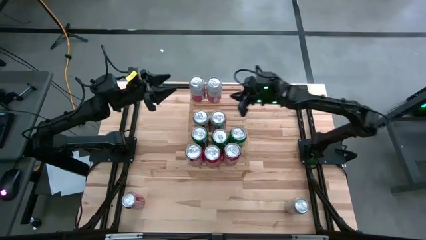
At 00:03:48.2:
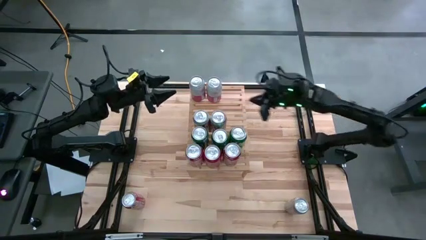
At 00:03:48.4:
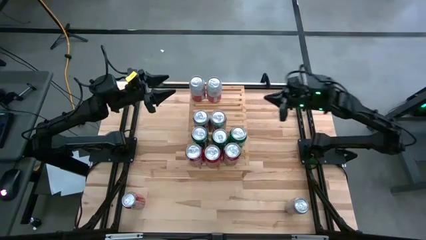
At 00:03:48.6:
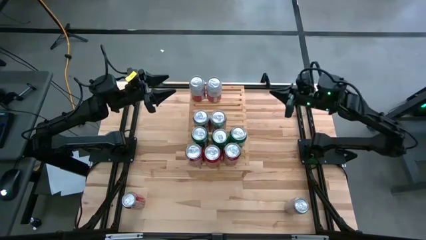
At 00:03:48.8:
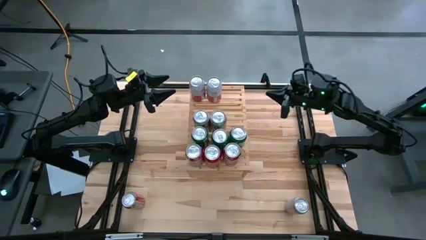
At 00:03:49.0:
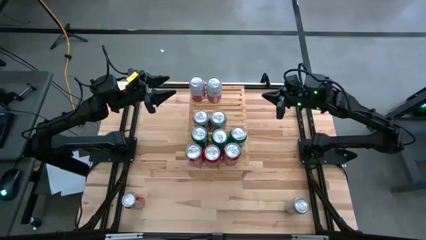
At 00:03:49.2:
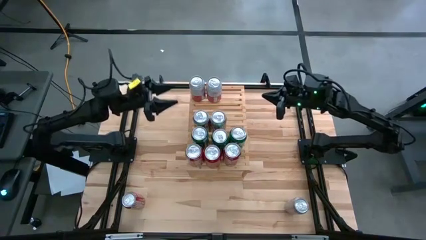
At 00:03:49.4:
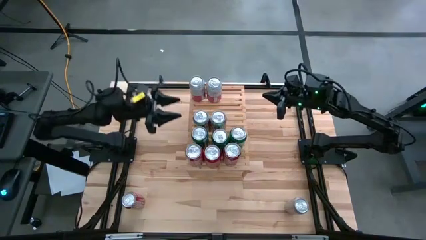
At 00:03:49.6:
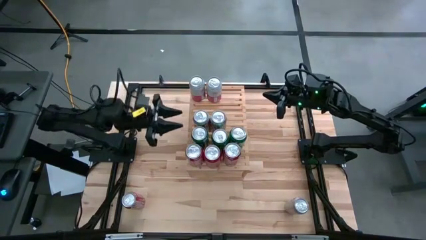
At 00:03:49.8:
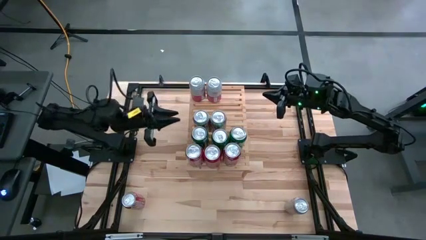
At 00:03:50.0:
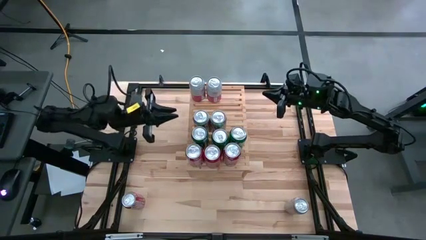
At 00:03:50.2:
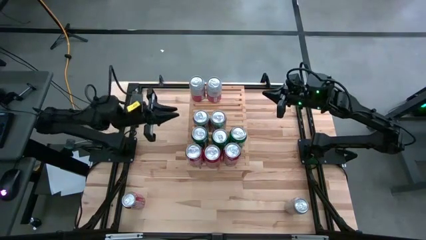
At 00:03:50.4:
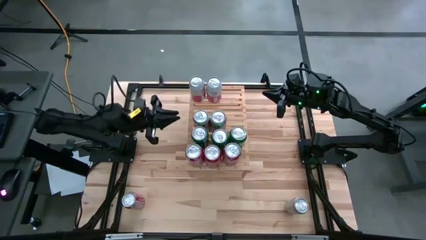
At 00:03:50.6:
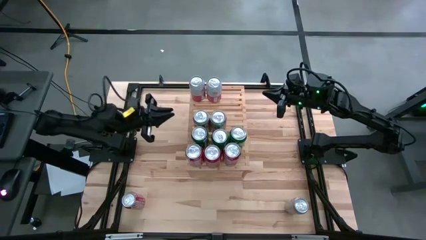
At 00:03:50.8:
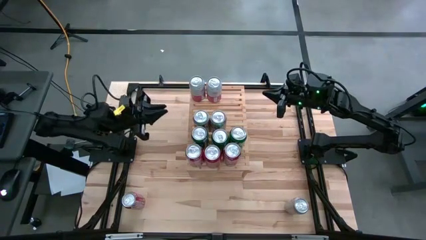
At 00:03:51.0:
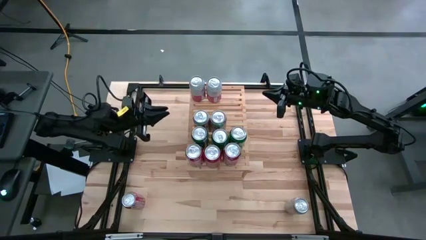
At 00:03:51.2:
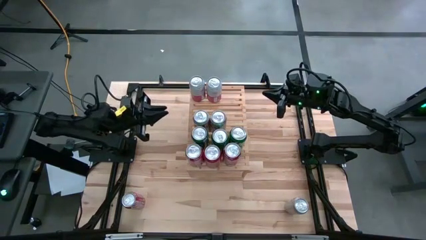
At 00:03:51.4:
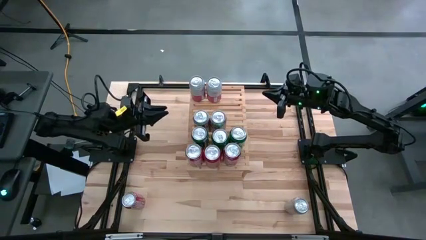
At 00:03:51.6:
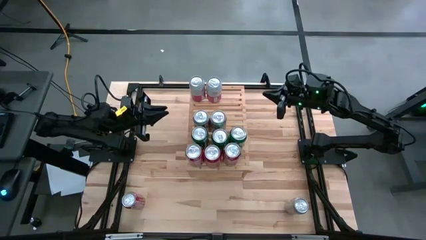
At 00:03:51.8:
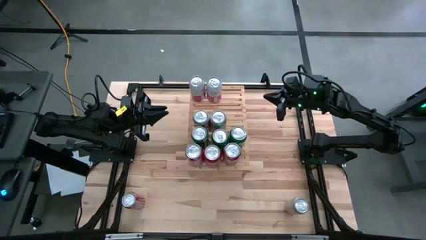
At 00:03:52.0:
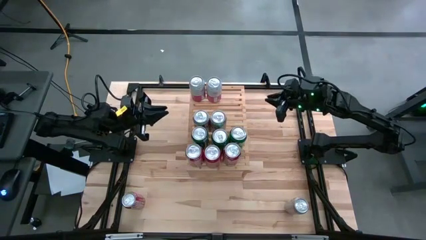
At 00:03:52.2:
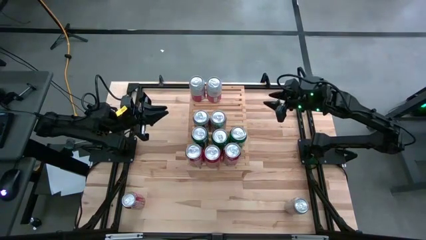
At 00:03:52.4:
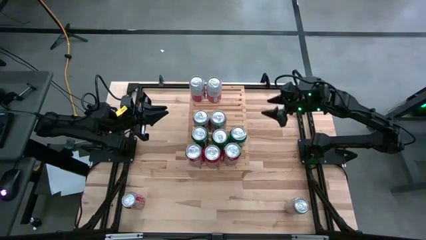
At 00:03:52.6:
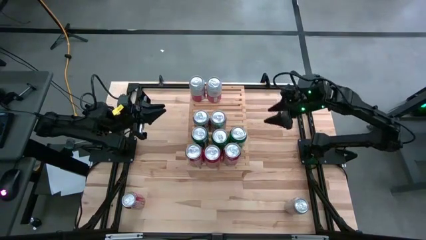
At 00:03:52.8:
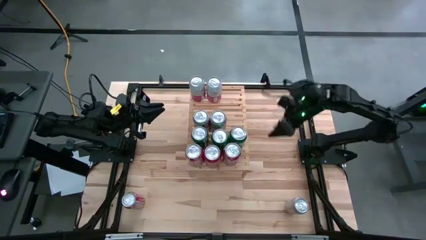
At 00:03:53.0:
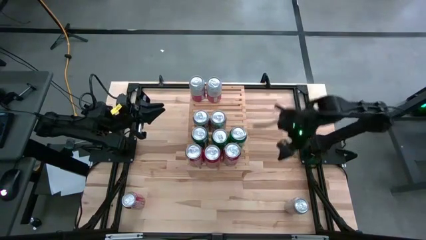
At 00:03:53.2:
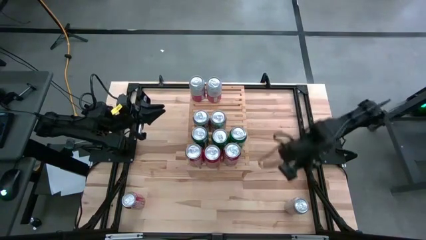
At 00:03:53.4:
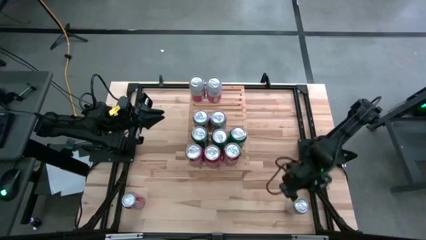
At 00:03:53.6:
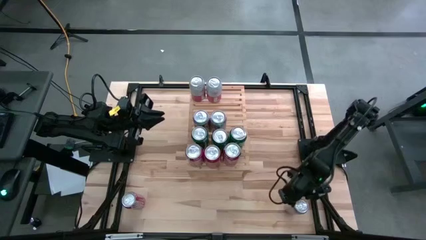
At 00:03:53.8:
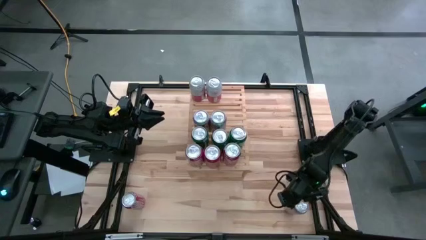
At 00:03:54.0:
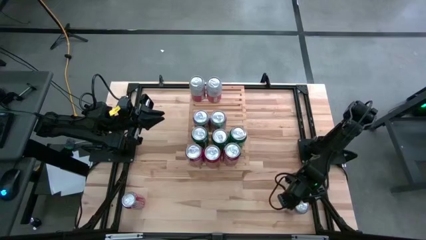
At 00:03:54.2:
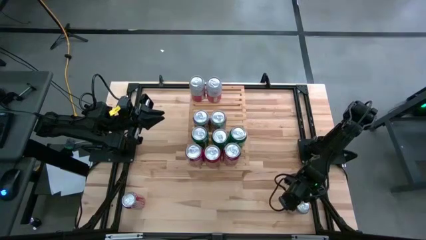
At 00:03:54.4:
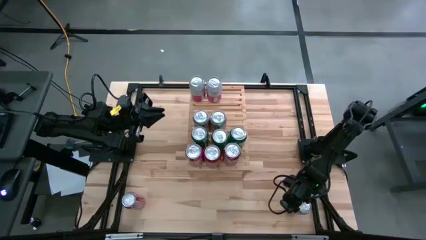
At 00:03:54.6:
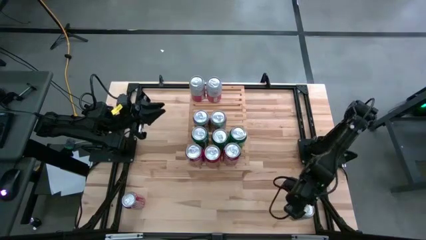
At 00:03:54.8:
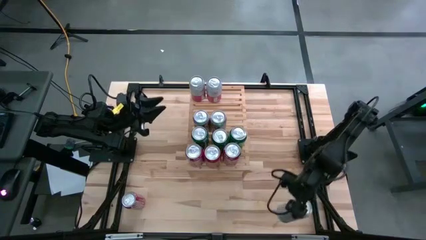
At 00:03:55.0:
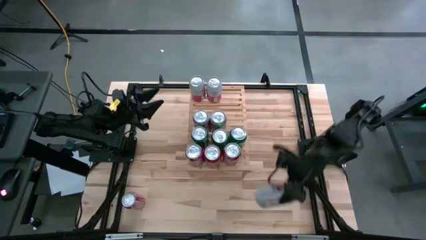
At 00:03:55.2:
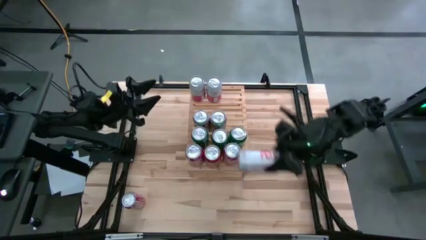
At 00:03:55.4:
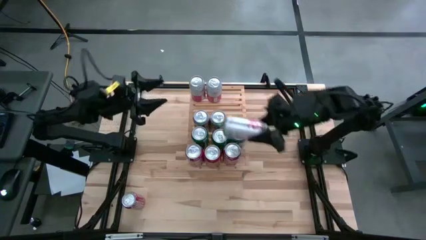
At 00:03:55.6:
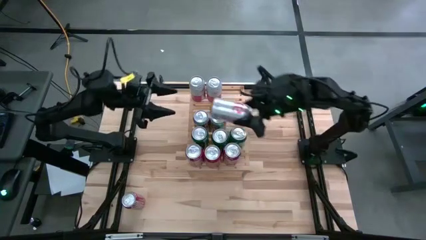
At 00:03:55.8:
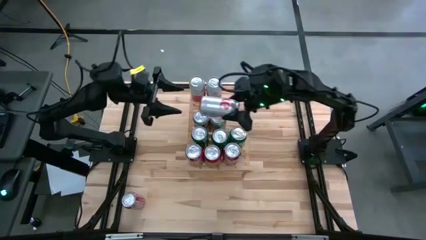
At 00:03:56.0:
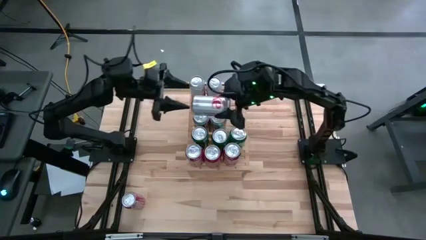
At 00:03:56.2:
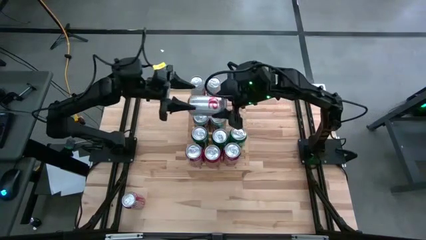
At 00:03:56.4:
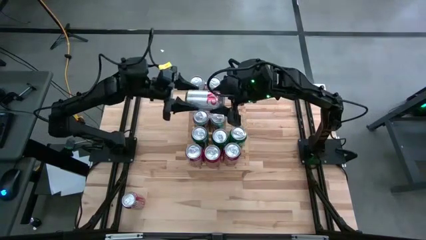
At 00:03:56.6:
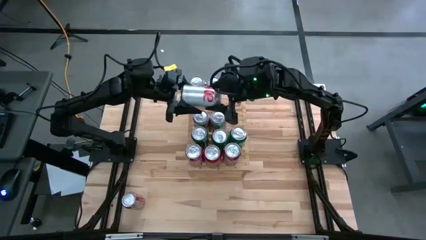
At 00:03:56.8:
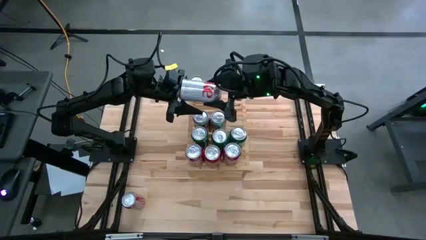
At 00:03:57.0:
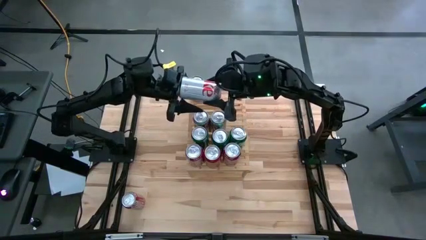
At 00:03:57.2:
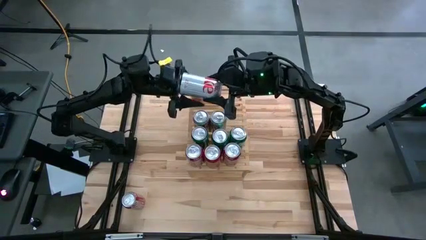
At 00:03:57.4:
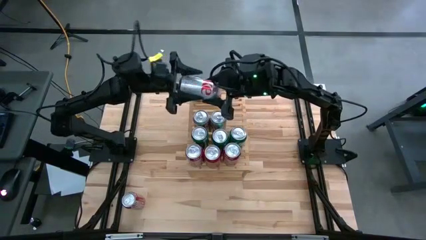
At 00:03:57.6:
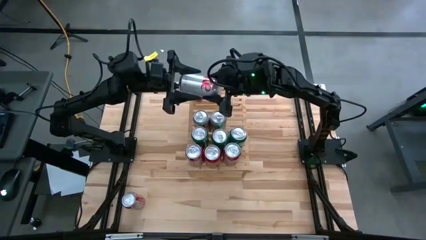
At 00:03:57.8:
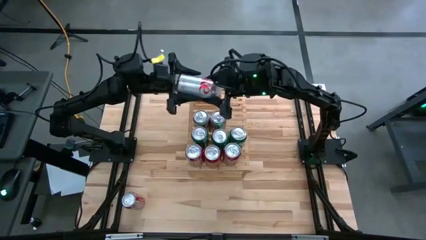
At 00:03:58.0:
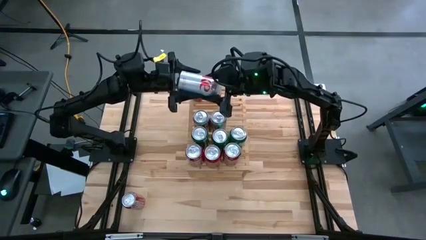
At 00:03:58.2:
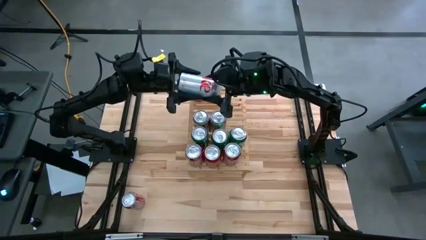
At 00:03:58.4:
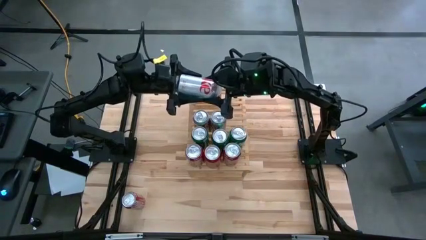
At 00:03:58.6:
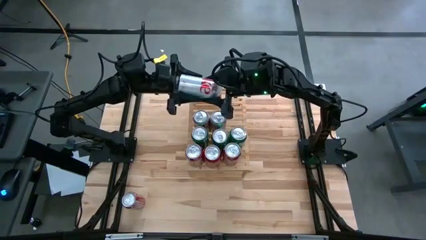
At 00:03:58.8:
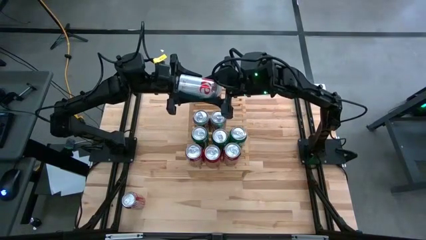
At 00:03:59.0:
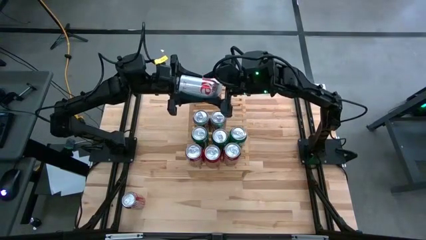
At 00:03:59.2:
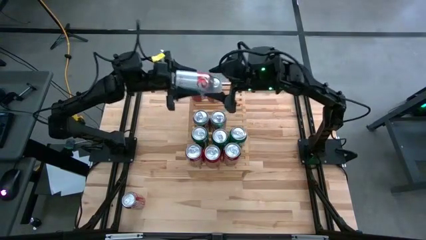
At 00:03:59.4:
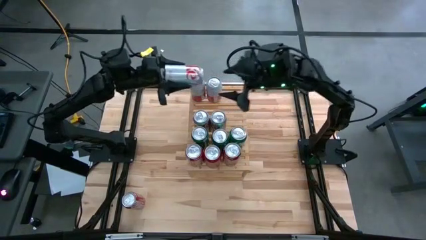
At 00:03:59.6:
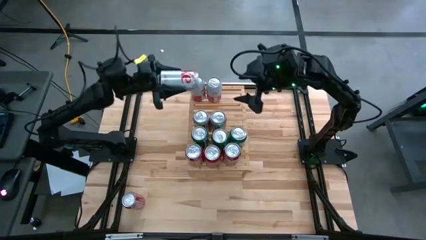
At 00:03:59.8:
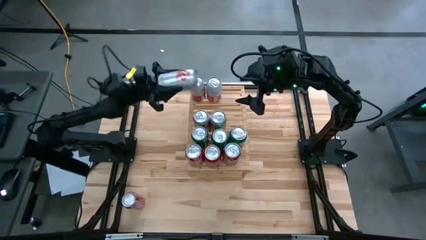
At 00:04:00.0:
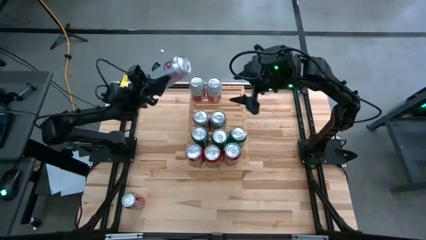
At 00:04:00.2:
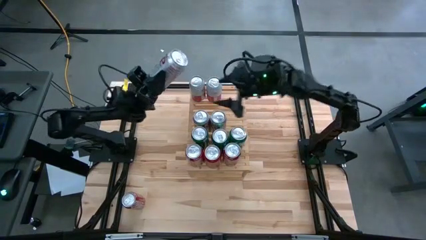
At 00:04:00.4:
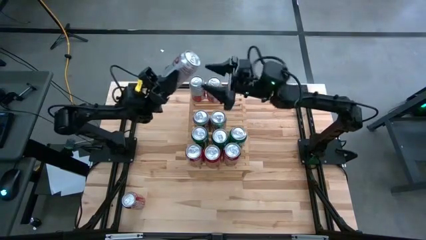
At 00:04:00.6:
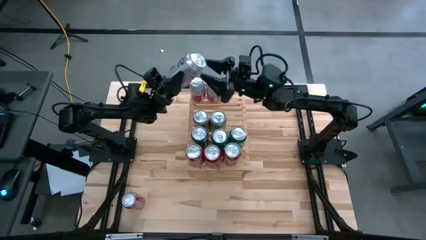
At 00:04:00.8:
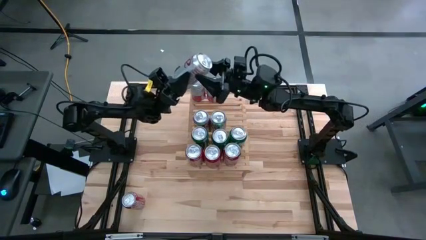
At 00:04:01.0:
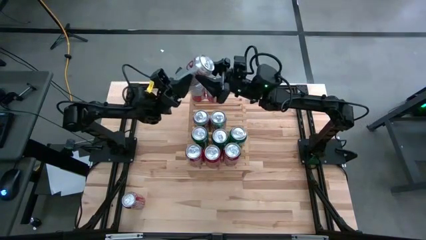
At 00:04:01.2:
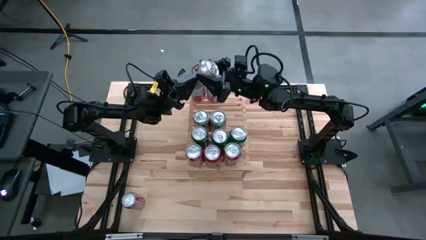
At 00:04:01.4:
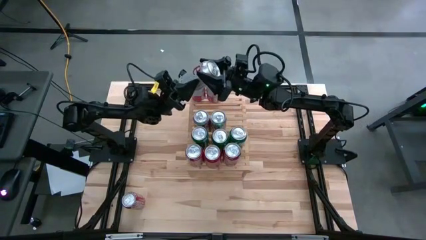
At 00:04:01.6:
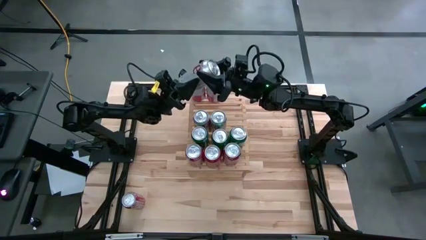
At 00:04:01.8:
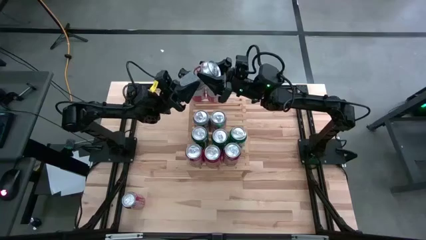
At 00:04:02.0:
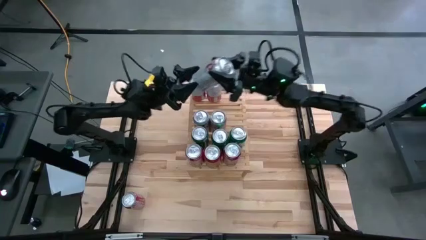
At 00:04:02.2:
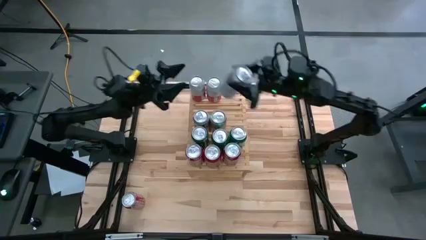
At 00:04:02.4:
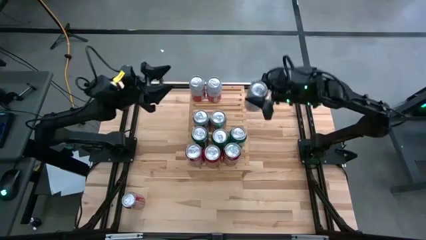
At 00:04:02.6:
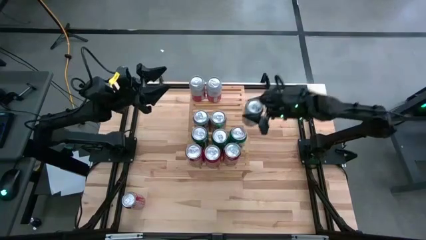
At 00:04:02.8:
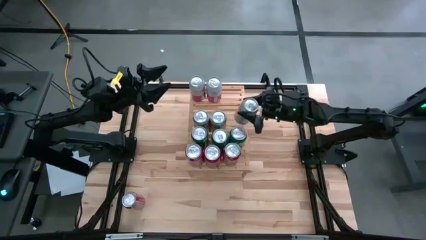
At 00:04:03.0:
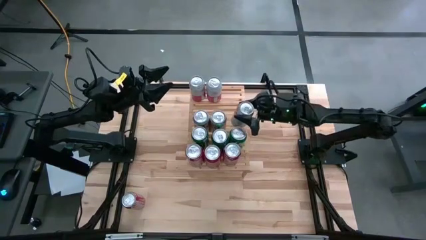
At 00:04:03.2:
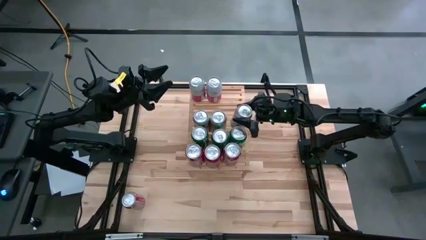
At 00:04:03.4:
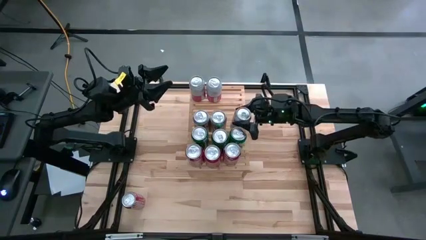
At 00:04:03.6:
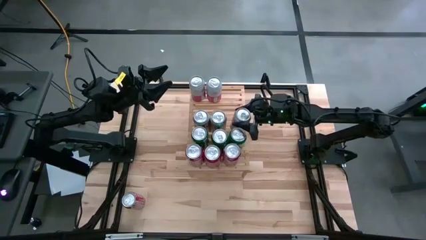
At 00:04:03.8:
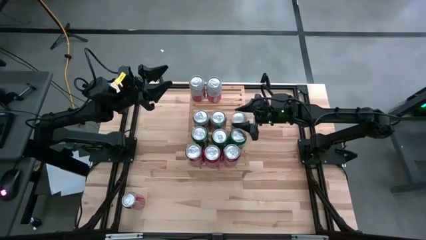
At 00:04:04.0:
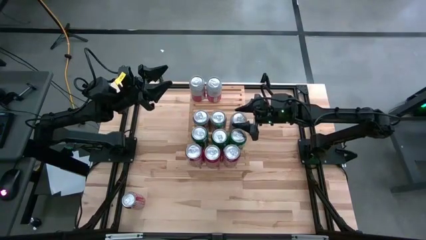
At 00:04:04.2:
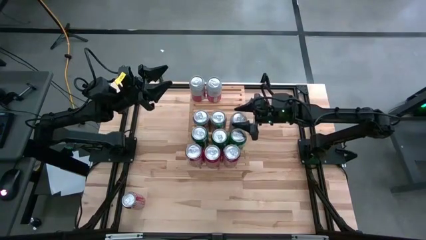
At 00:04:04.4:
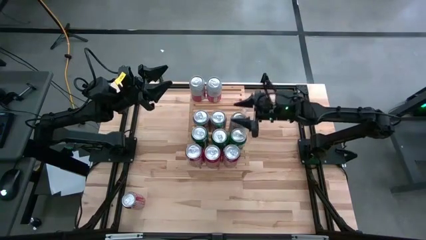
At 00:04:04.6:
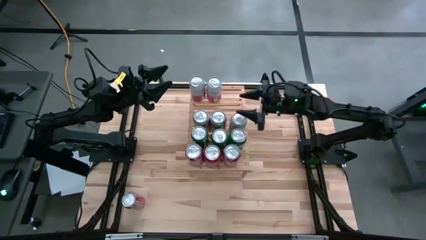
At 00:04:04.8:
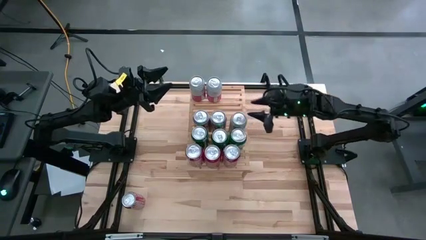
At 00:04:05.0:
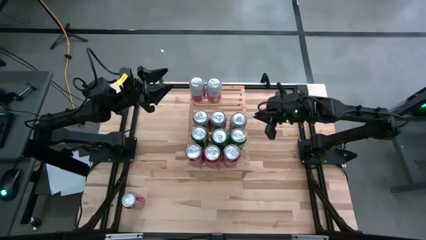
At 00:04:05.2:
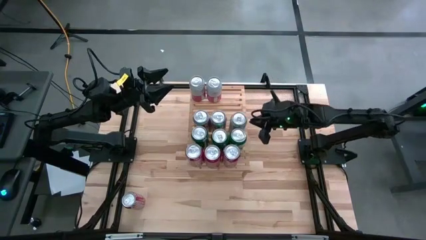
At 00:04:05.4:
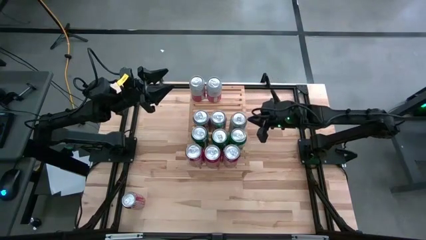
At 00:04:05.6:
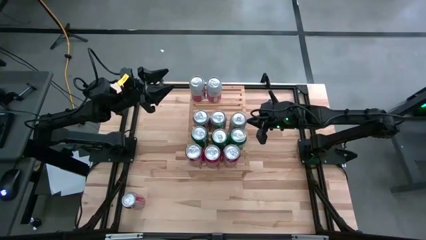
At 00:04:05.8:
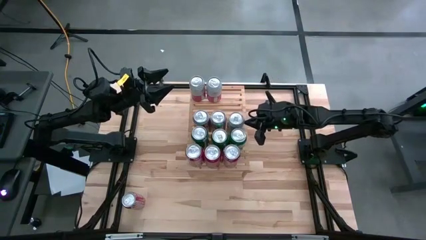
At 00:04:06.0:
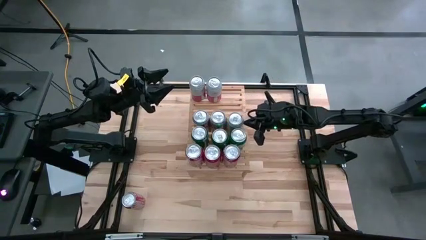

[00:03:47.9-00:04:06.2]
Task: Place canned beverage on shelf
Put the red-silver soda can on the shelf aligned with the other red-silver soda cans
